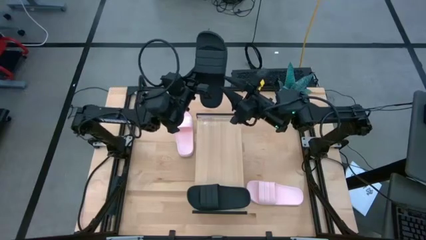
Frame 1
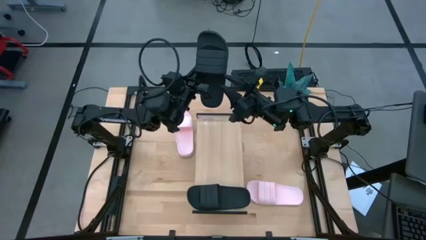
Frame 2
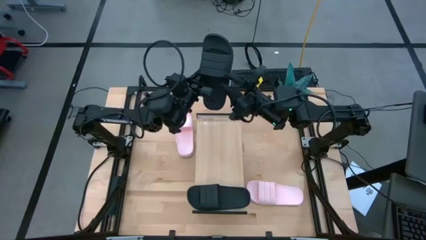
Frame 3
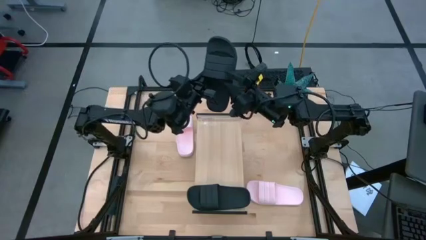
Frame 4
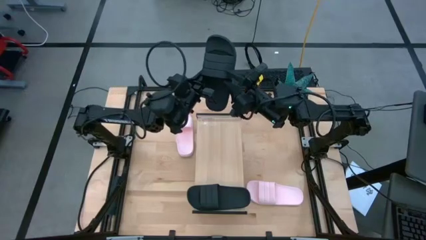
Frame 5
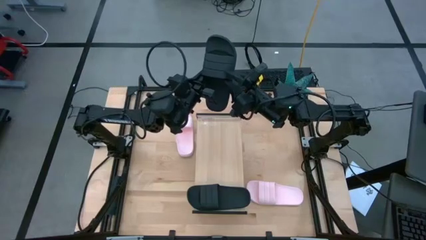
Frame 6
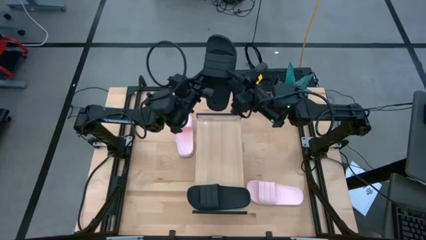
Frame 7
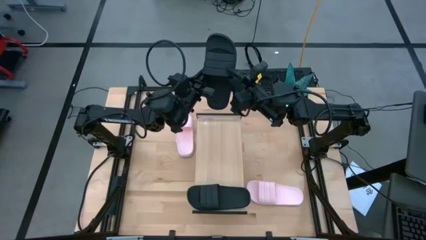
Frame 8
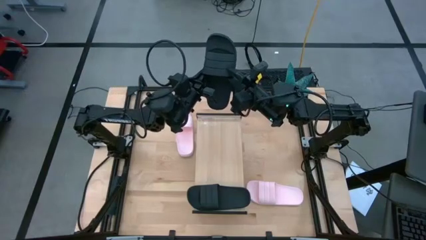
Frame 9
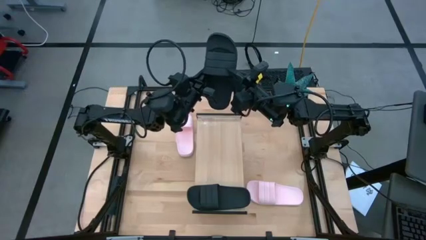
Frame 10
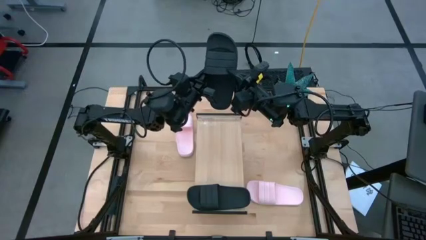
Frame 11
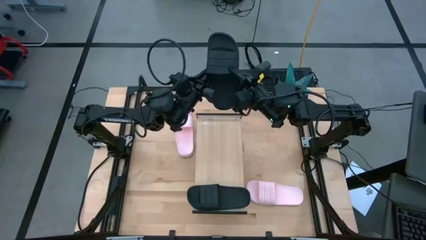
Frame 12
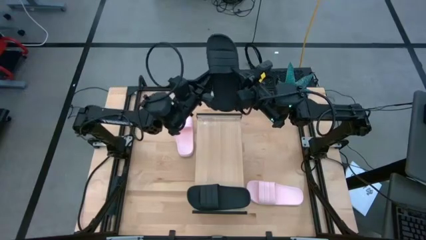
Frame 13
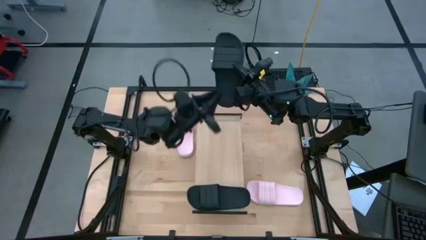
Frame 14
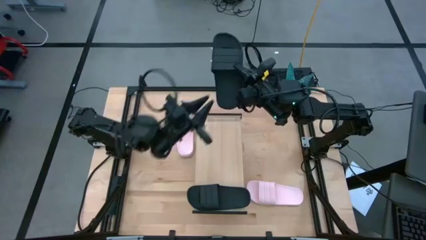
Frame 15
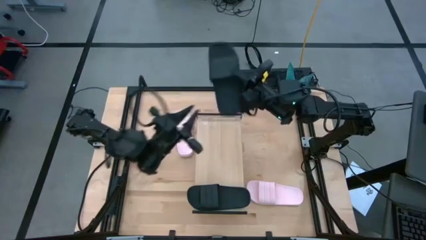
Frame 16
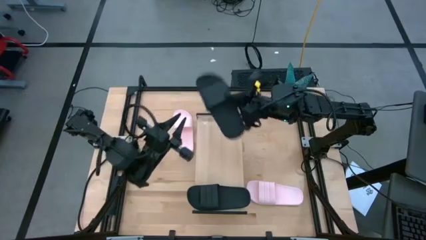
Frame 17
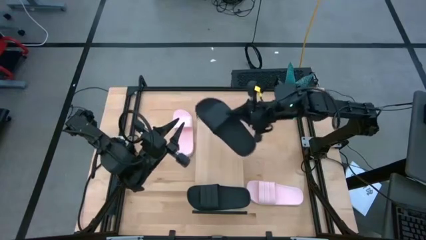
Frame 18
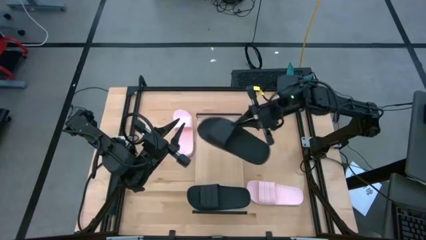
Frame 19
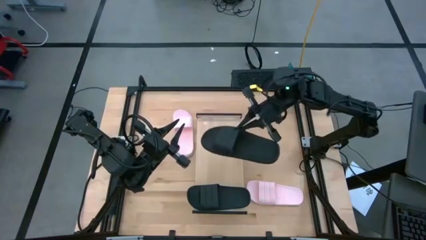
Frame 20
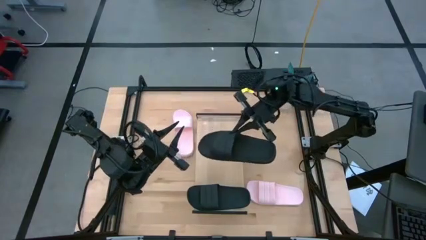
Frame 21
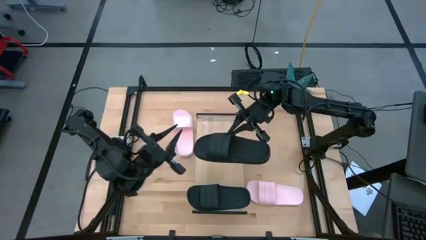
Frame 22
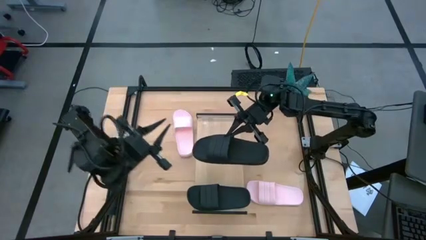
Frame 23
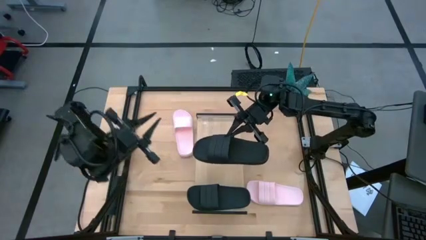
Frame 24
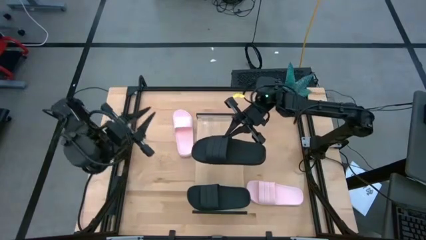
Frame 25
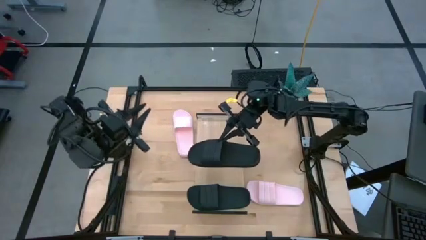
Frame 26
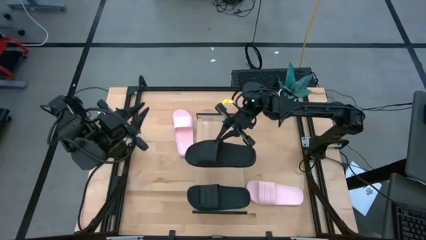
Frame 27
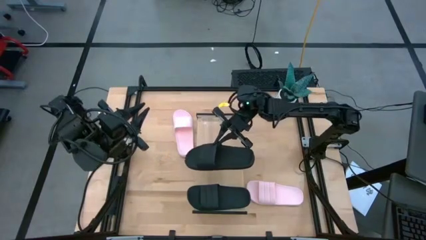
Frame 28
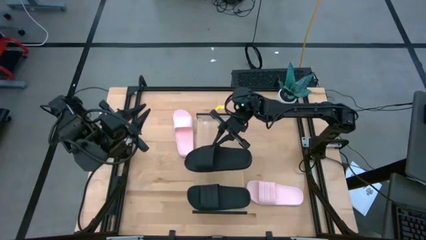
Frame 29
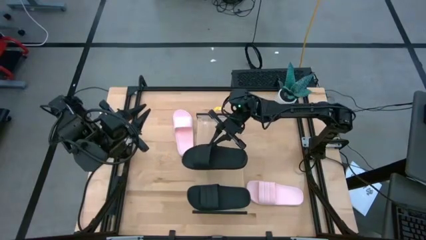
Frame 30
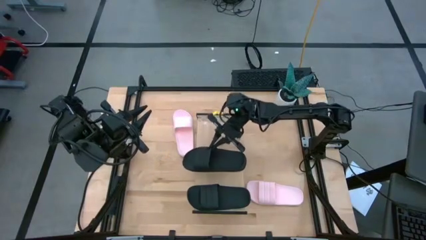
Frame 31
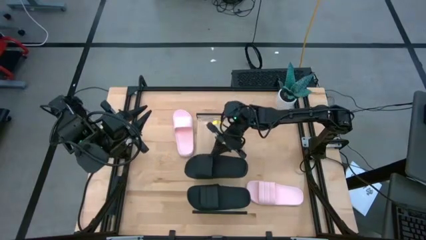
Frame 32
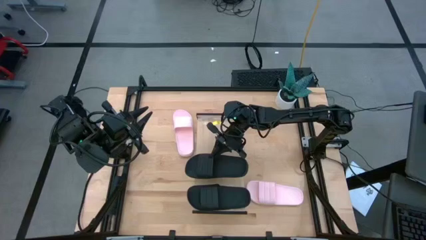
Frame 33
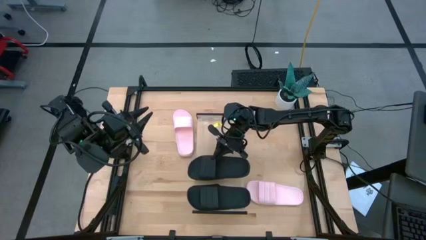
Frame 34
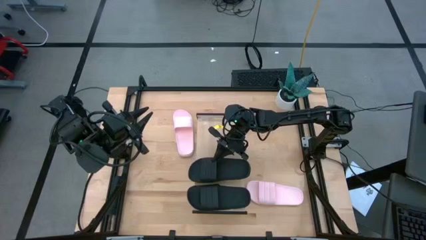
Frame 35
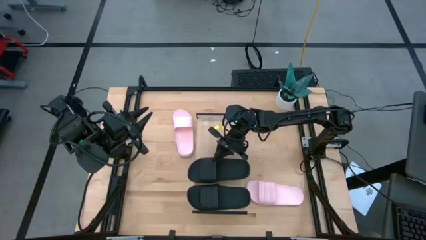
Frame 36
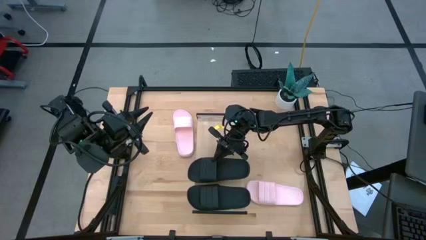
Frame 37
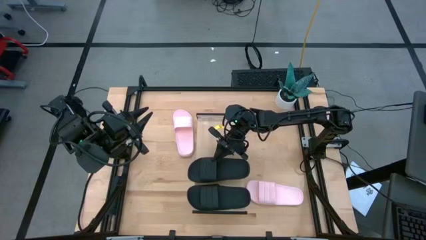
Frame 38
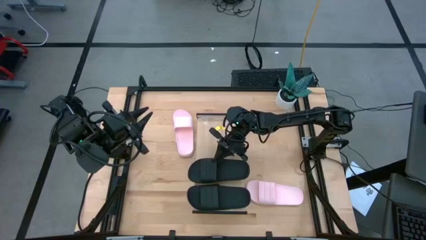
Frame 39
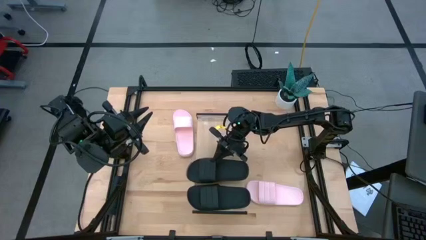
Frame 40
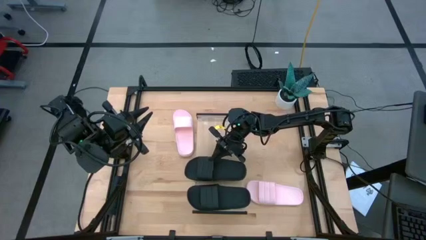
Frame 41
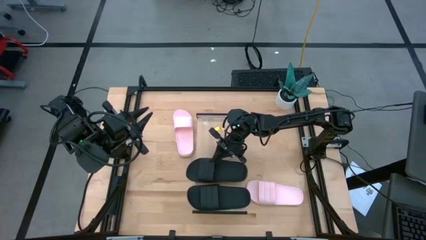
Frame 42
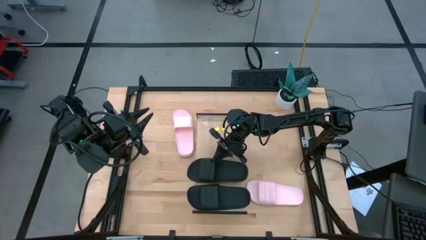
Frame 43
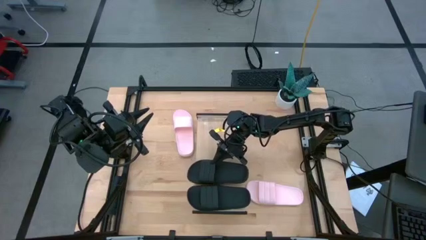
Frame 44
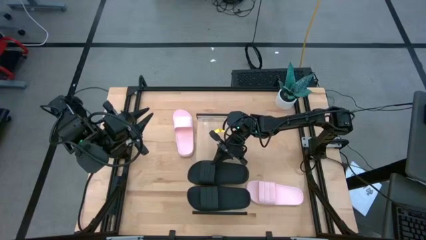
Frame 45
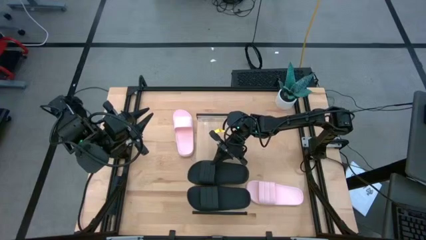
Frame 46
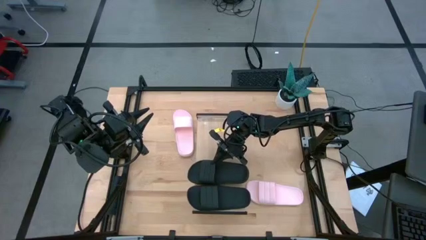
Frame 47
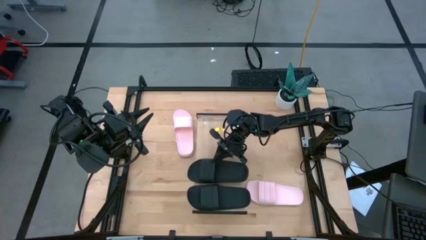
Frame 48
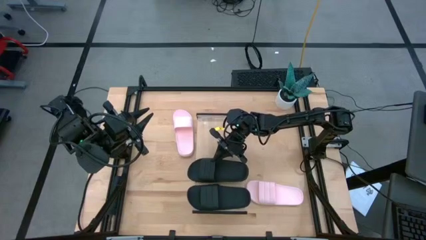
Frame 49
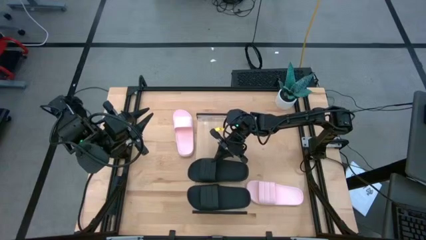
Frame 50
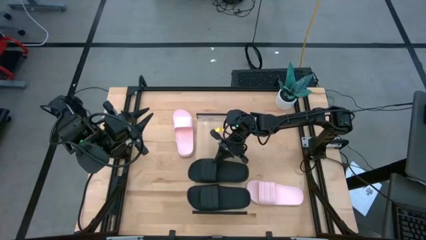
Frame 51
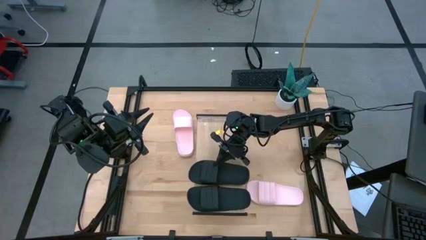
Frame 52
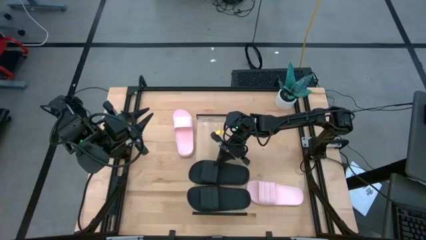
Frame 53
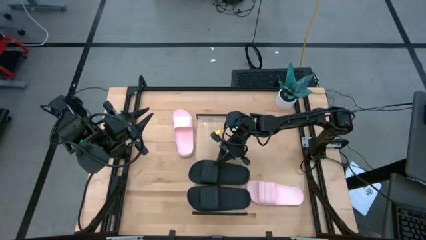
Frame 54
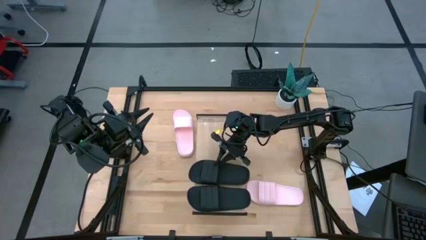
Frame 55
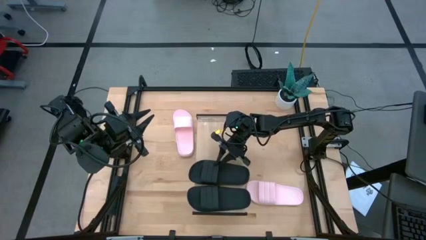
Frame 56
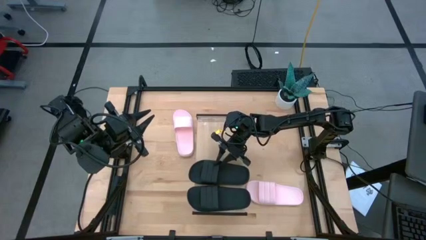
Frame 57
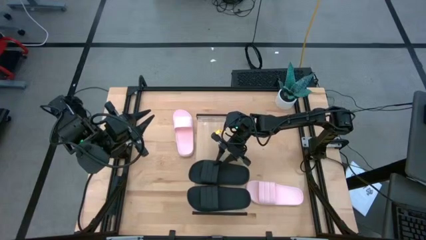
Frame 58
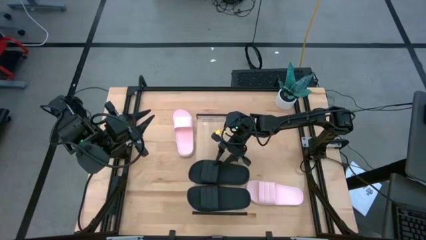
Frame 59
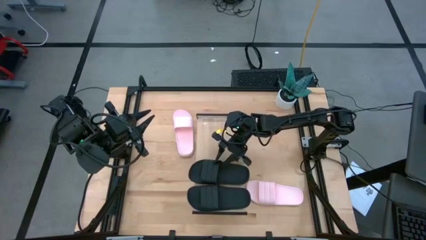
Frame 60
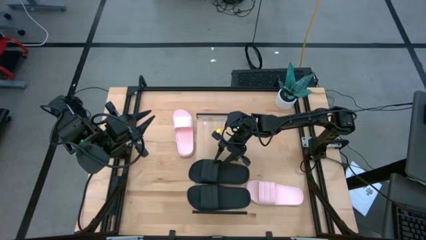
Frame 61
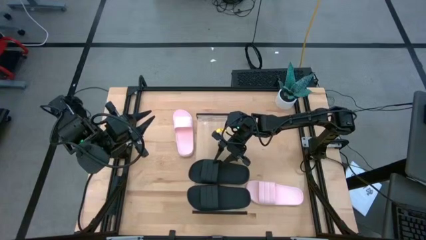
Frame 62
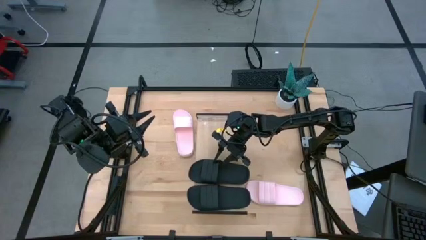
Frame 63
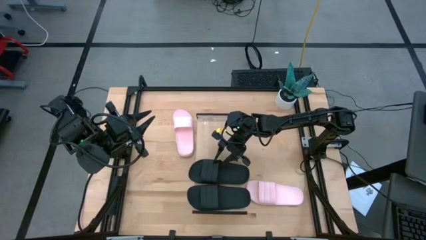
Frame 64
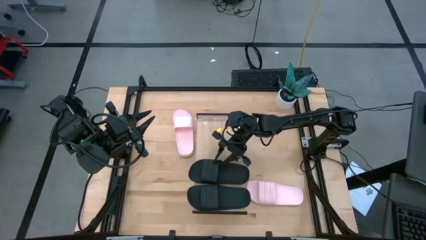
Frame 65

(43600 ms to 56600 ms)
Task: Pick and place slides into the shelf
Put the black slides on the shelf
